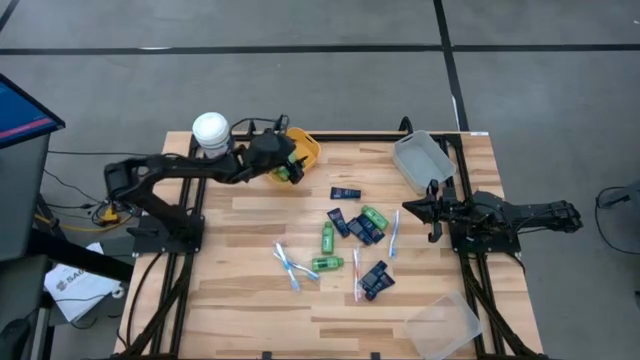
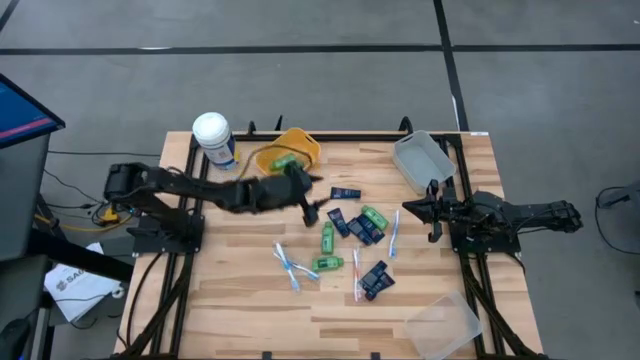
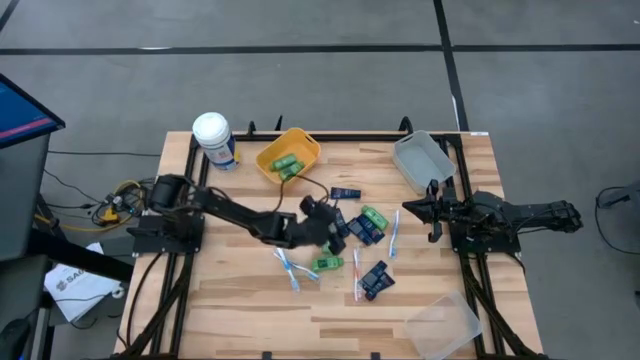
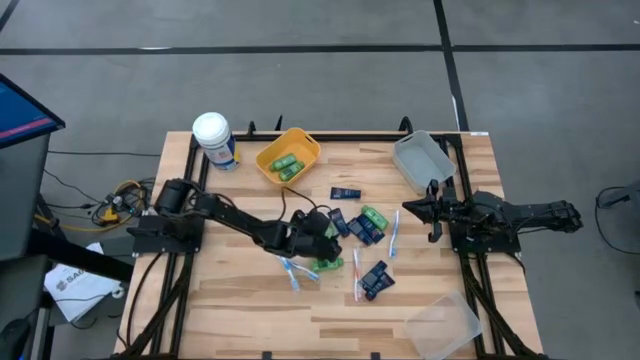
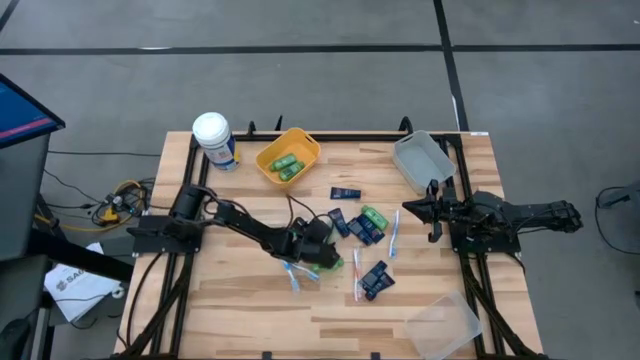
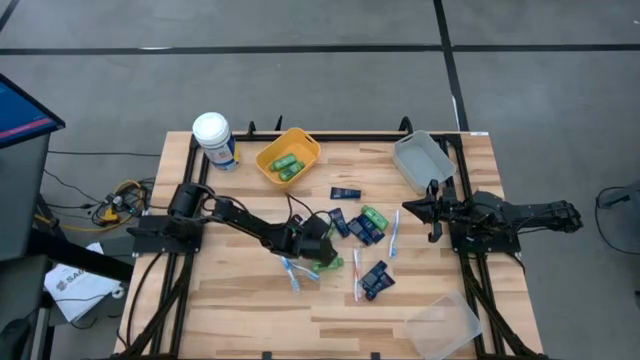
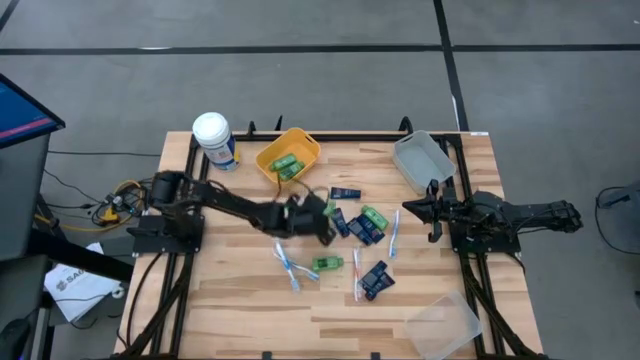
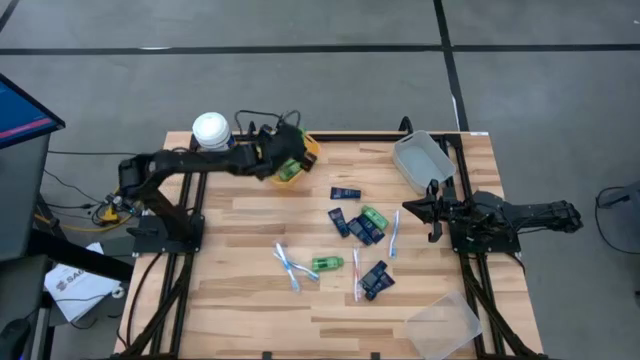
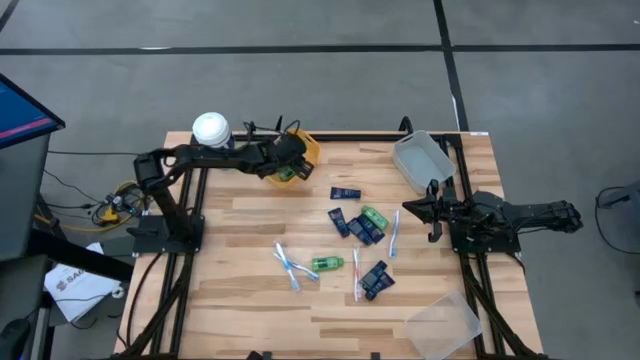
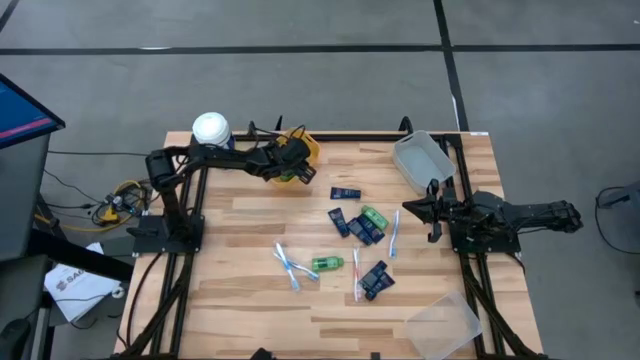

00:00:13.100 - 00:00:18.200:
Task: Pick & Place Travel size toiletries
Put the green shampoo into the yellow bin

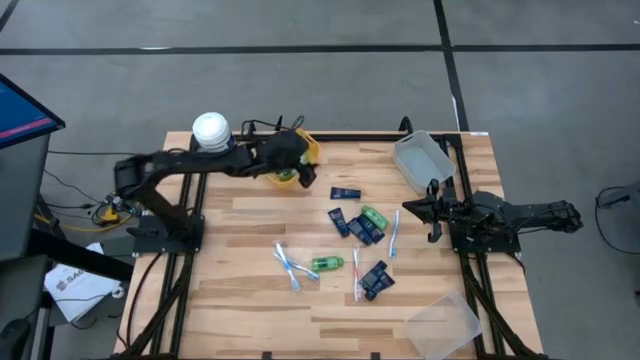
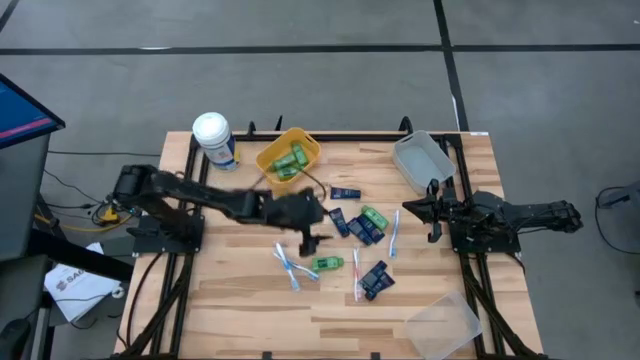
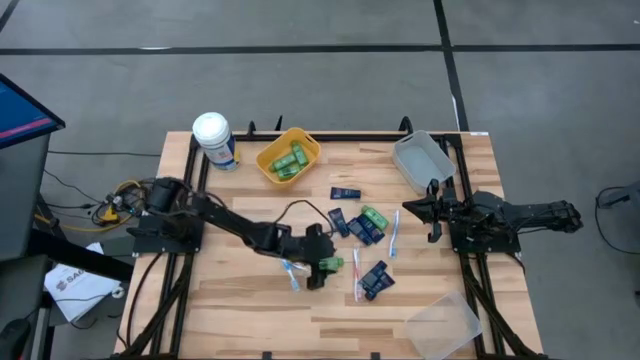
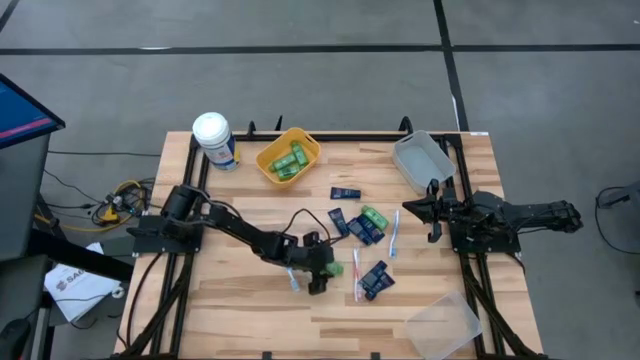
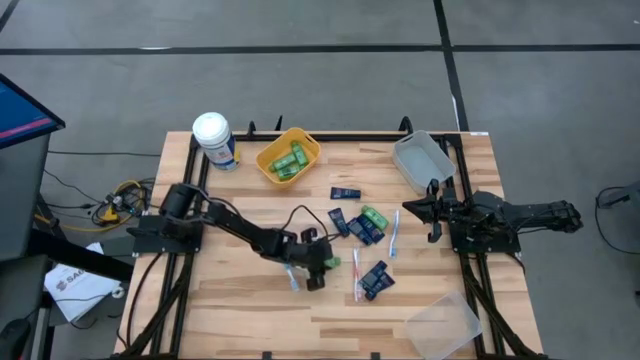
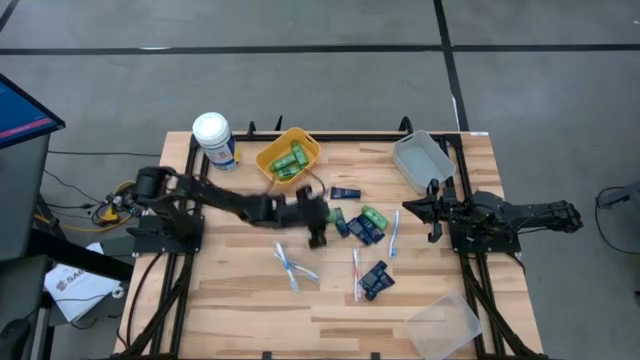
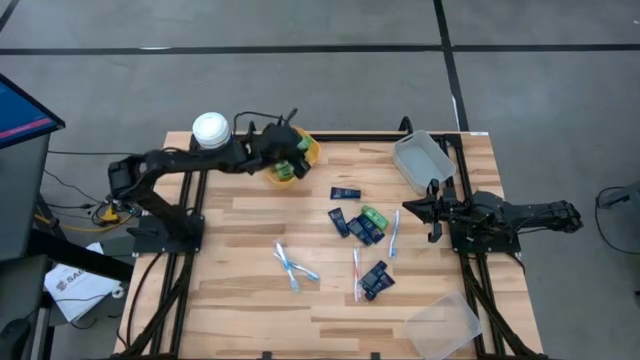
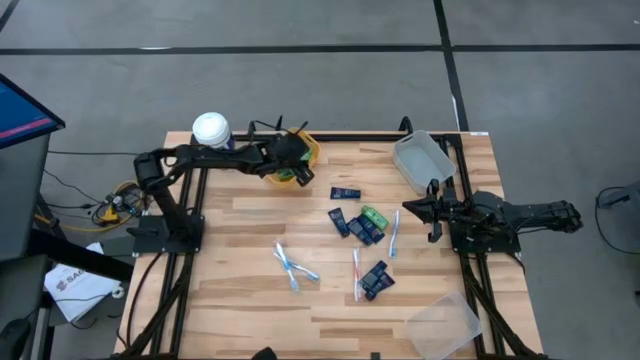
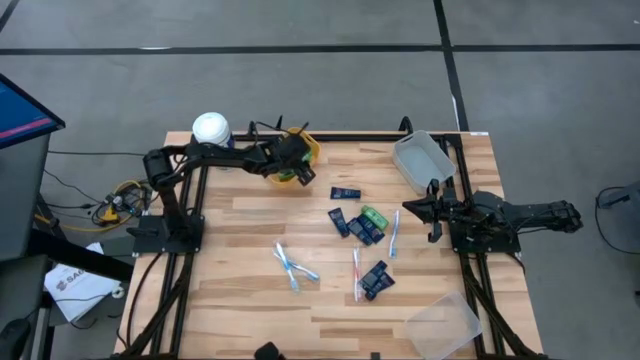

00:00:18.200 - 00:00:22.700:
Put the green shampoo into the yellow bin

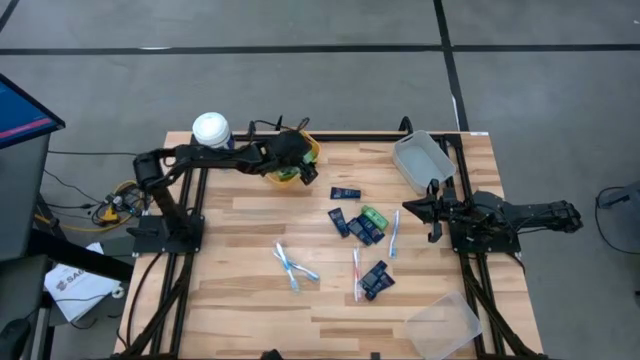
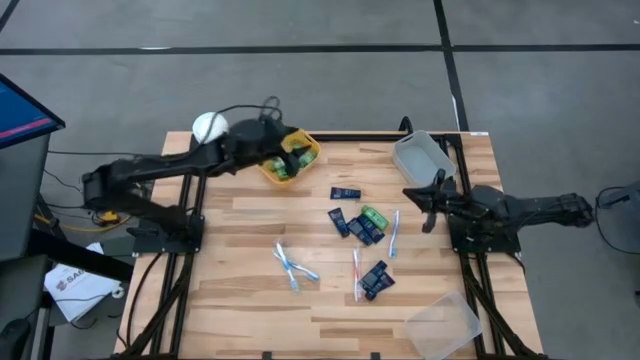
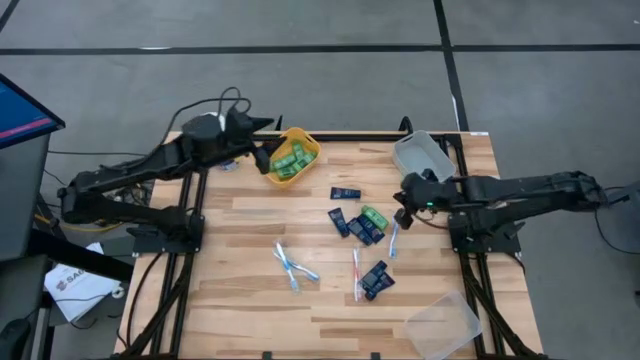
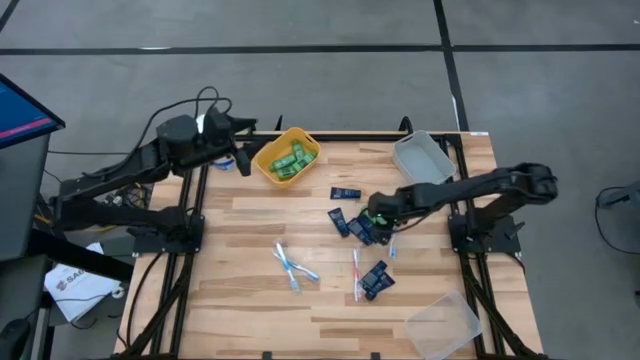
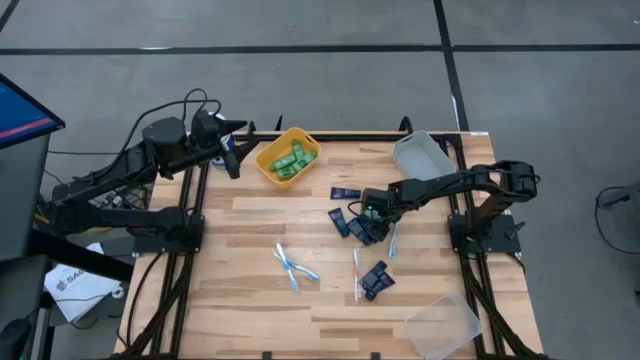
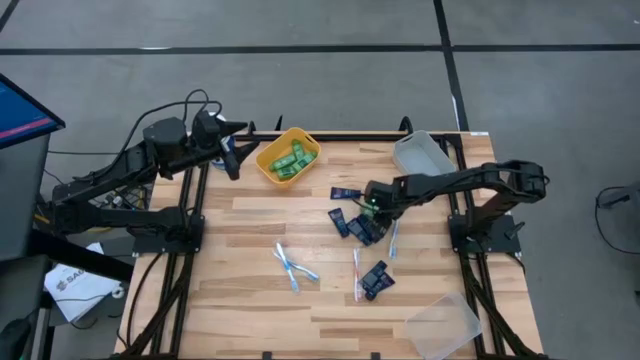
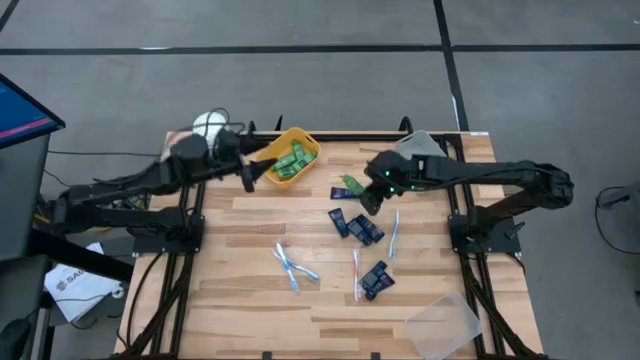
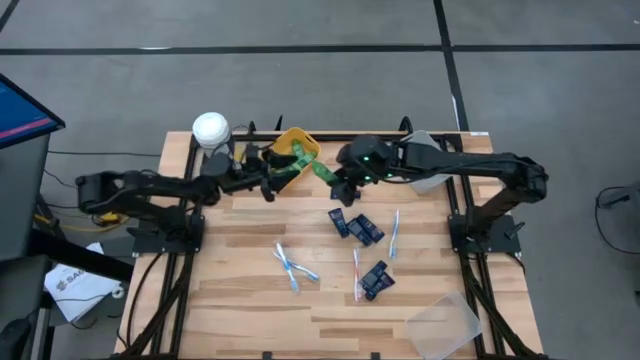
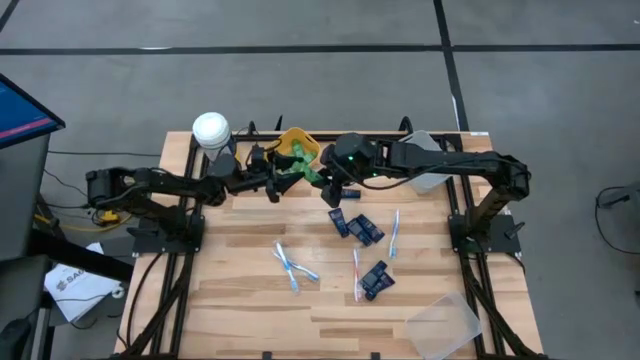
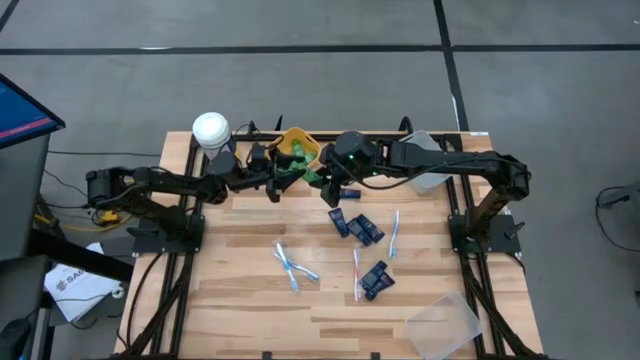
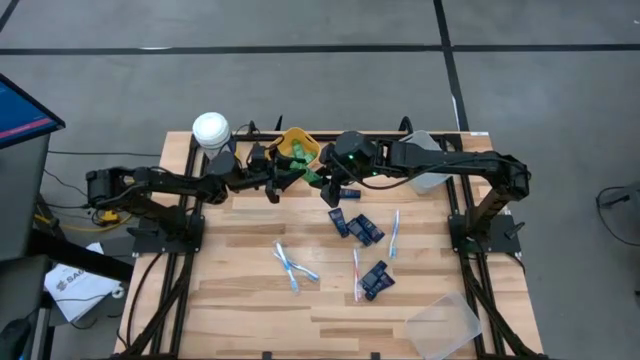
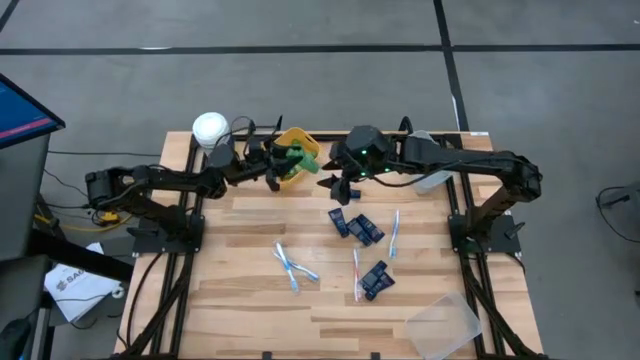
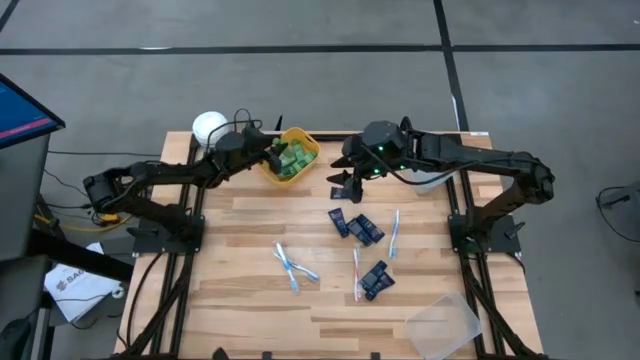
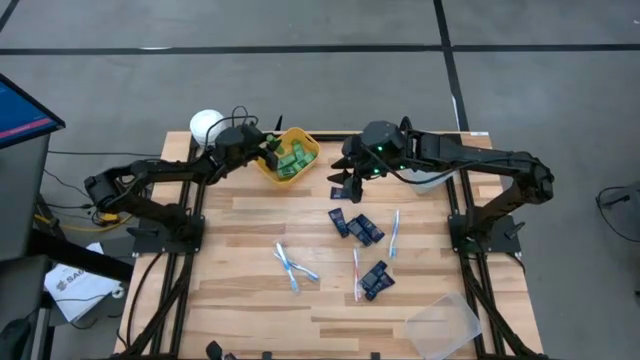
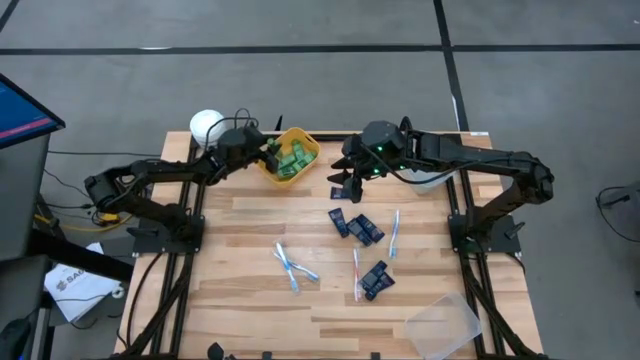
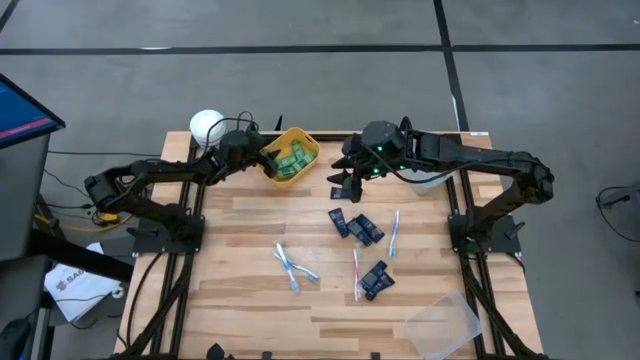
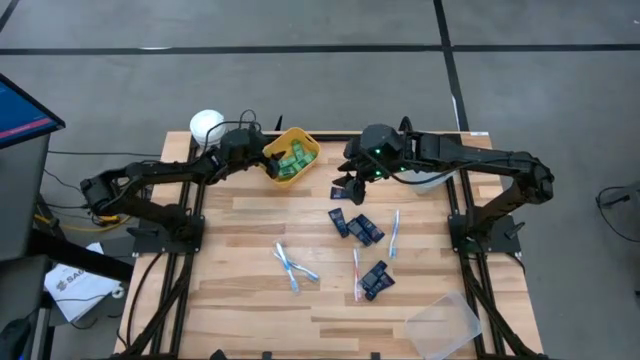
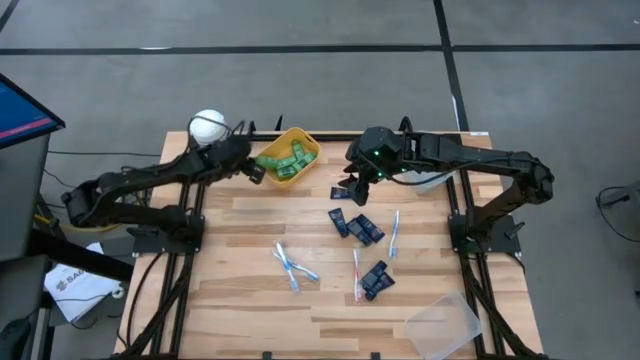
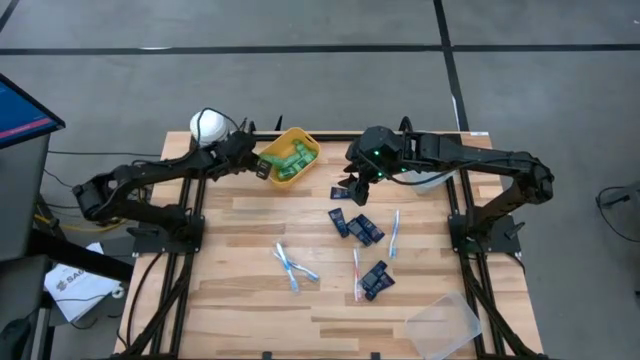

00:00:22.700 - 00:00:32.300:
Put the green shampoo into the yellow bin

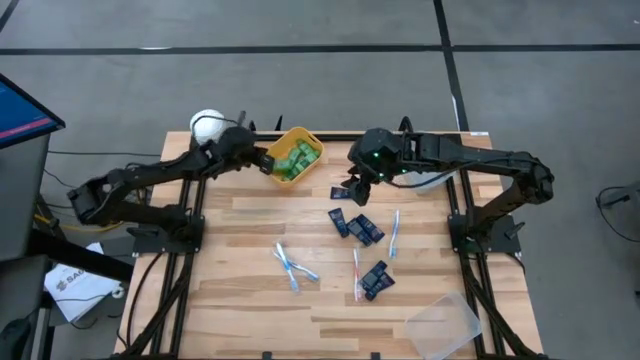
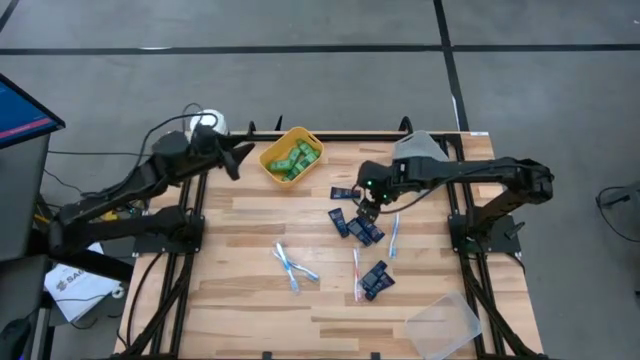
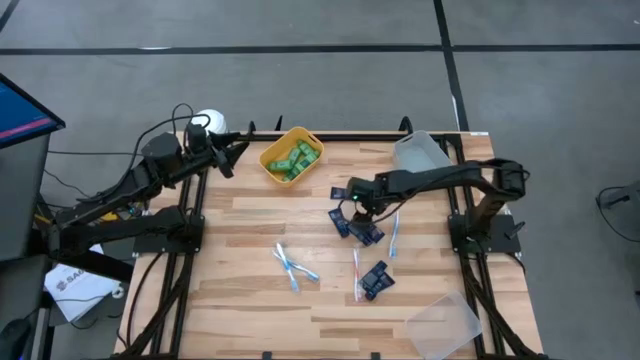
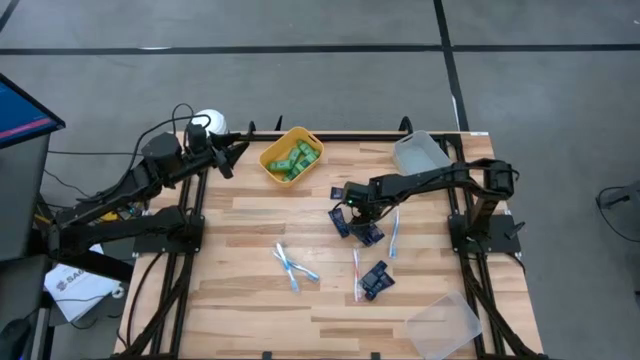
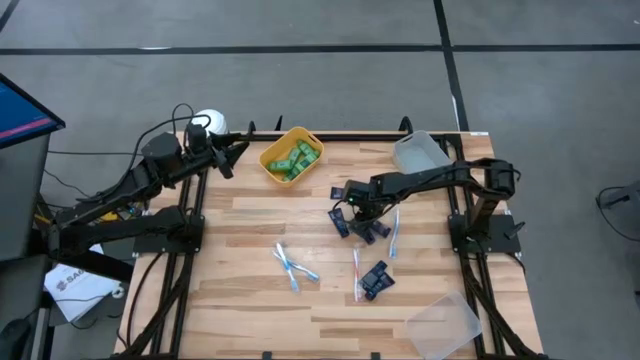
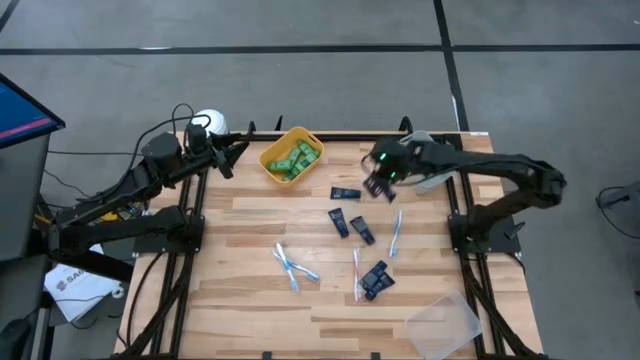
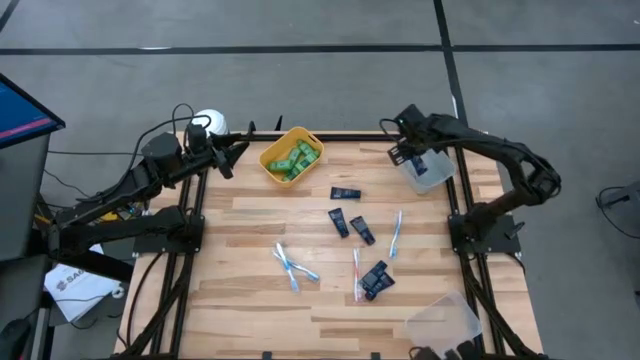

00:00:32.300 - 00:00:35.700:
Put the blue shave cream into the gray bin
